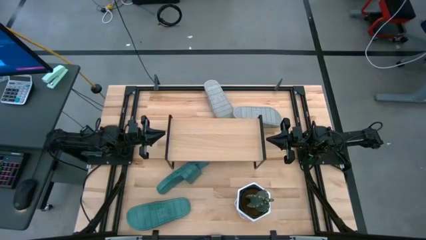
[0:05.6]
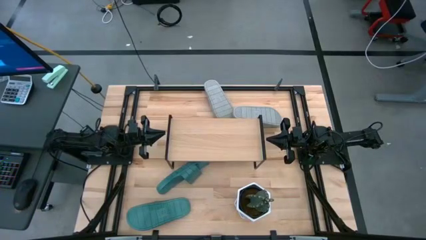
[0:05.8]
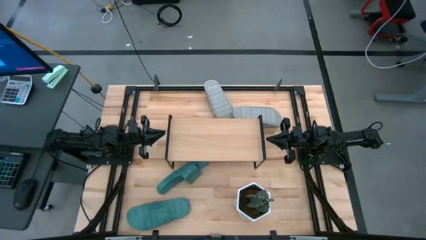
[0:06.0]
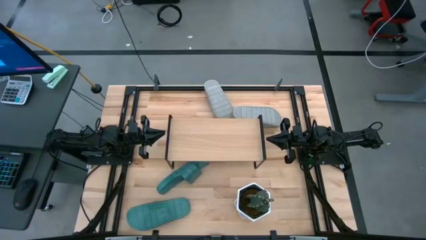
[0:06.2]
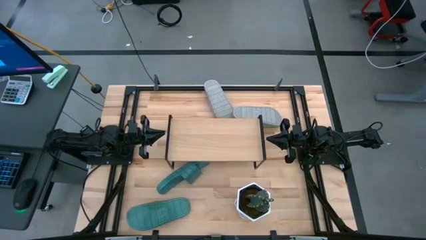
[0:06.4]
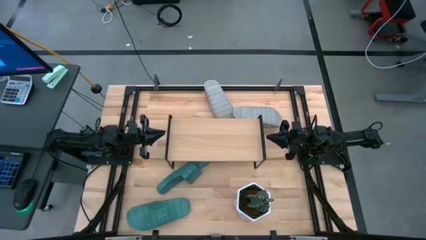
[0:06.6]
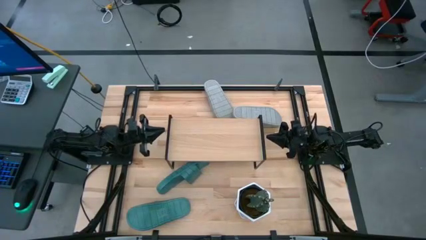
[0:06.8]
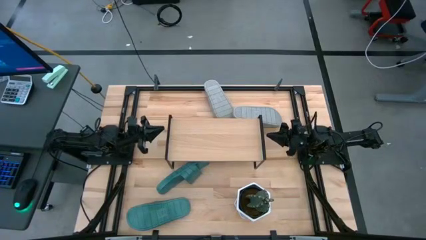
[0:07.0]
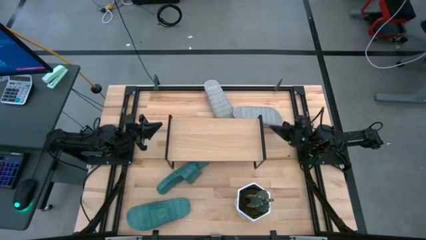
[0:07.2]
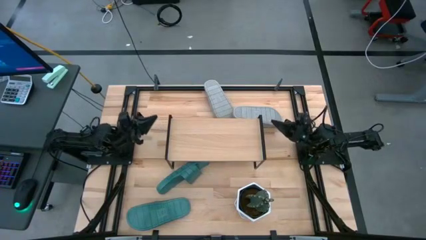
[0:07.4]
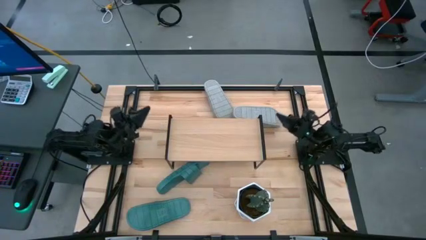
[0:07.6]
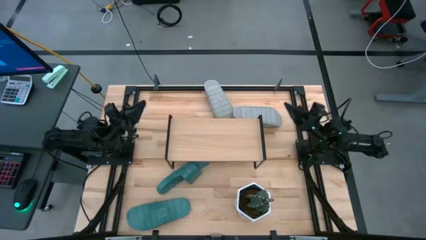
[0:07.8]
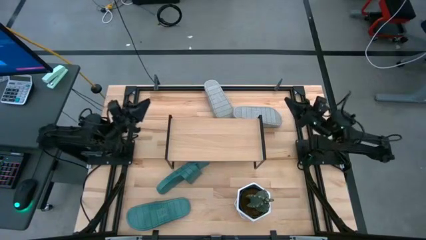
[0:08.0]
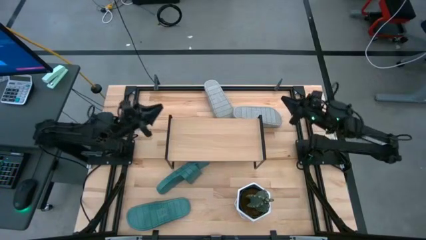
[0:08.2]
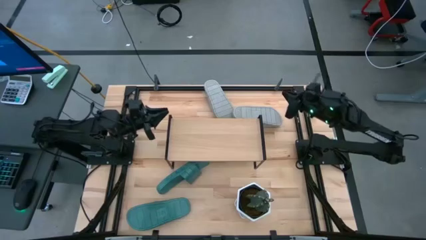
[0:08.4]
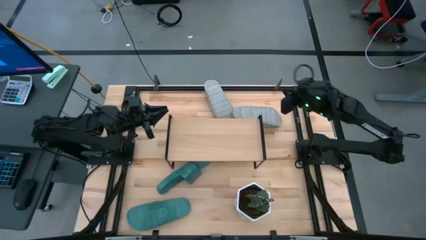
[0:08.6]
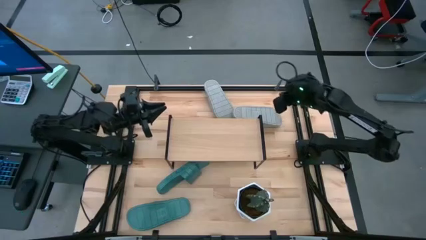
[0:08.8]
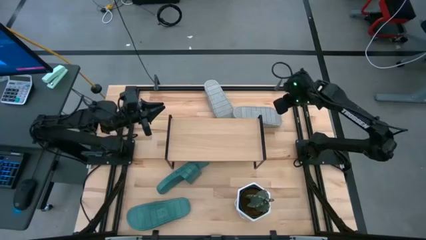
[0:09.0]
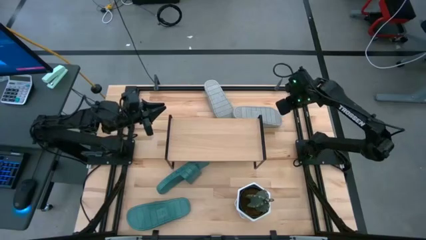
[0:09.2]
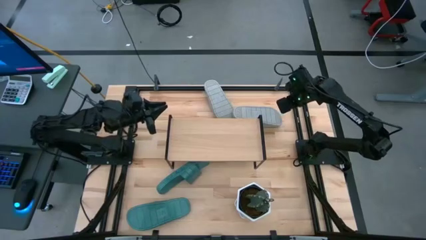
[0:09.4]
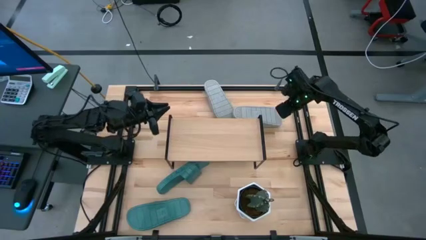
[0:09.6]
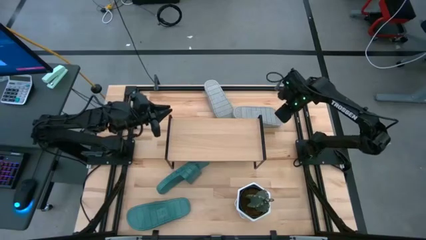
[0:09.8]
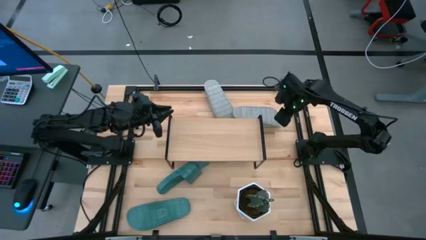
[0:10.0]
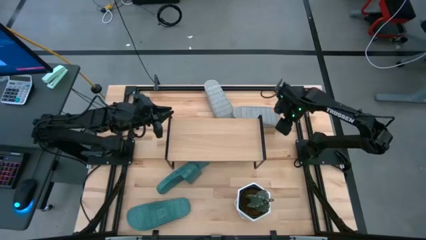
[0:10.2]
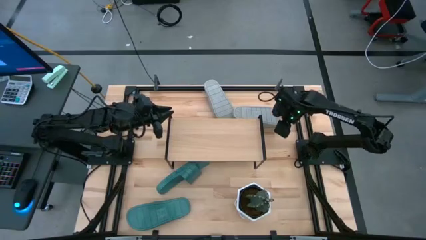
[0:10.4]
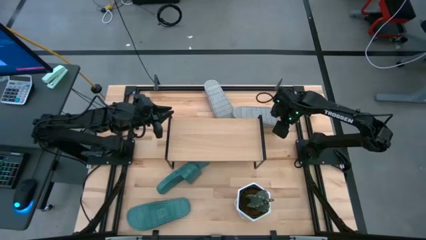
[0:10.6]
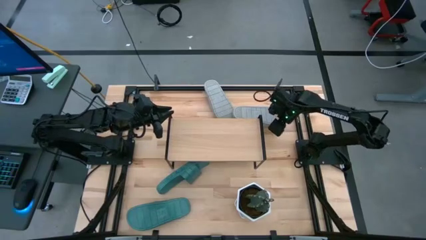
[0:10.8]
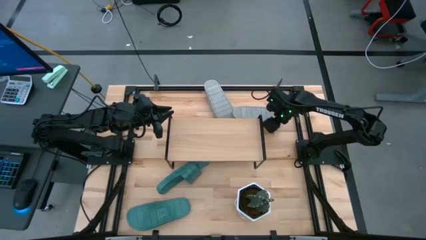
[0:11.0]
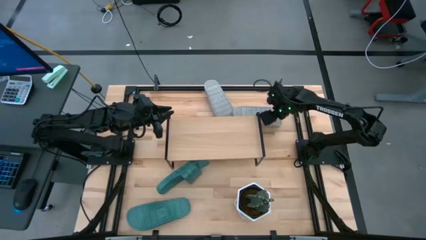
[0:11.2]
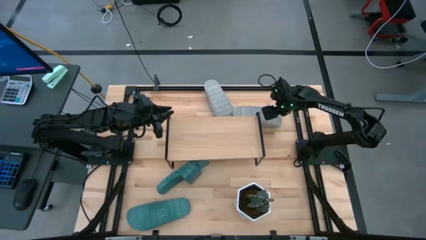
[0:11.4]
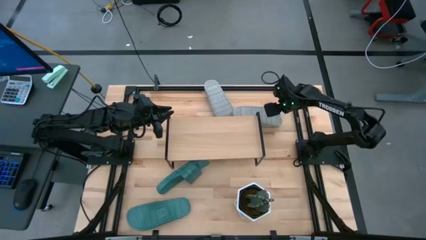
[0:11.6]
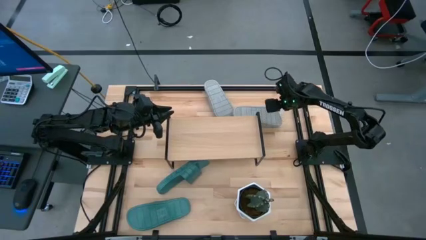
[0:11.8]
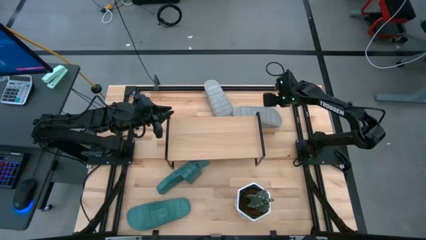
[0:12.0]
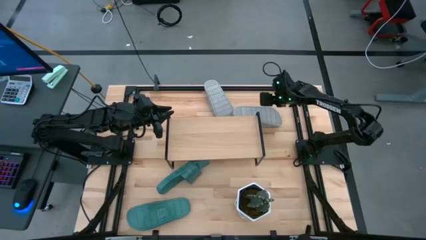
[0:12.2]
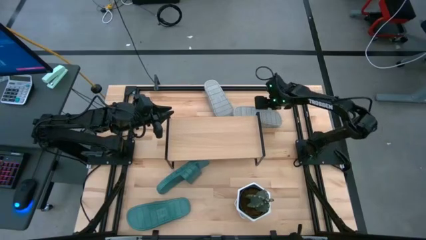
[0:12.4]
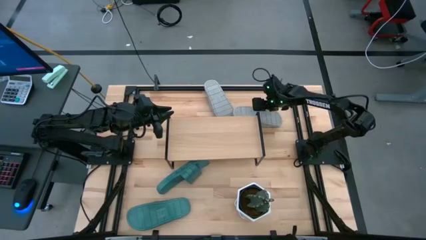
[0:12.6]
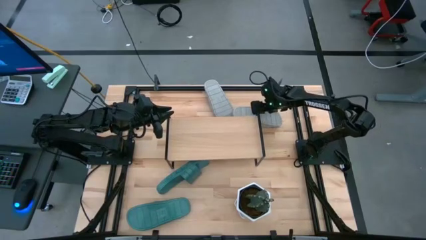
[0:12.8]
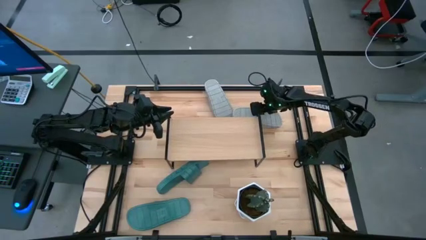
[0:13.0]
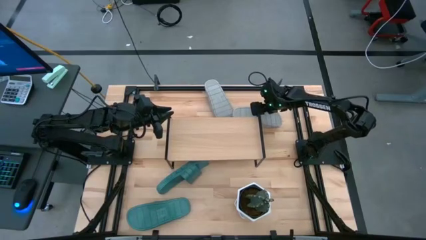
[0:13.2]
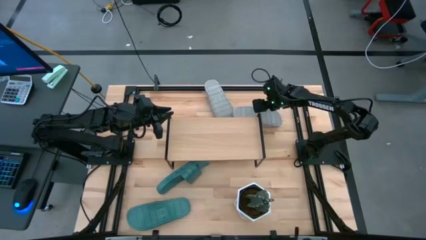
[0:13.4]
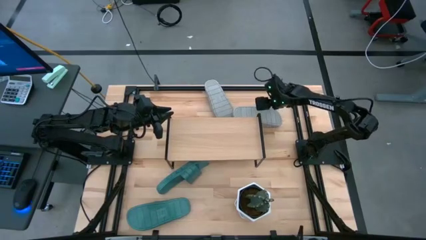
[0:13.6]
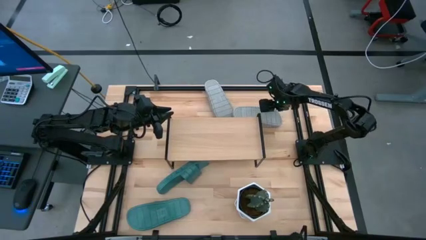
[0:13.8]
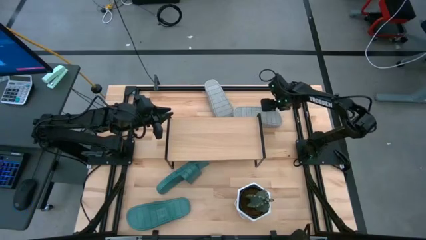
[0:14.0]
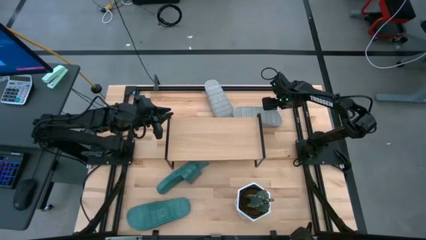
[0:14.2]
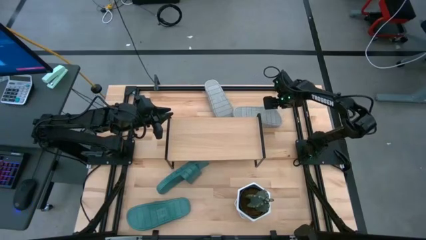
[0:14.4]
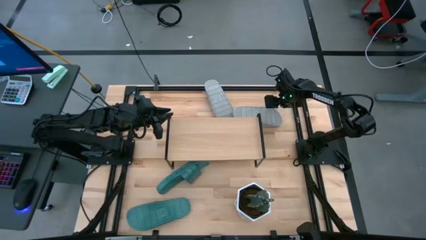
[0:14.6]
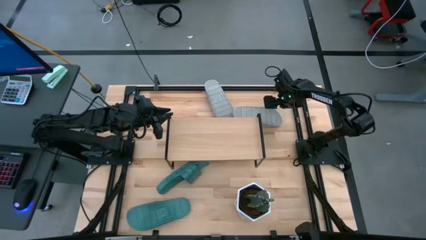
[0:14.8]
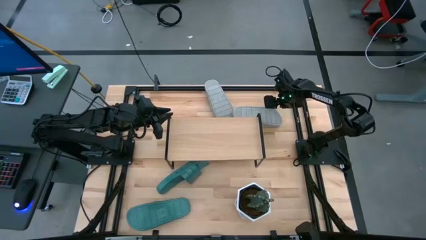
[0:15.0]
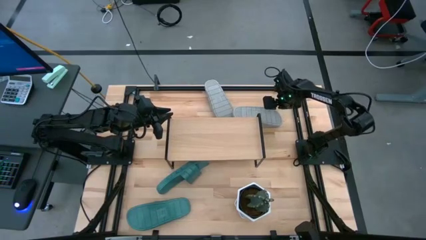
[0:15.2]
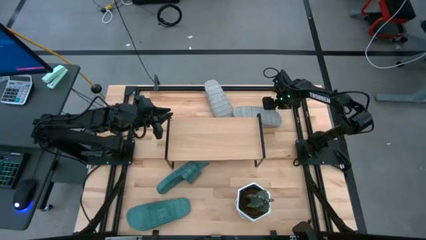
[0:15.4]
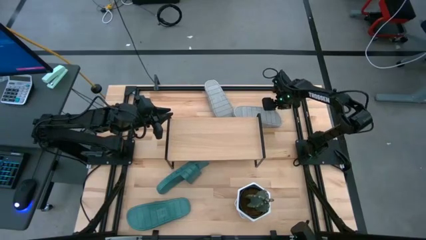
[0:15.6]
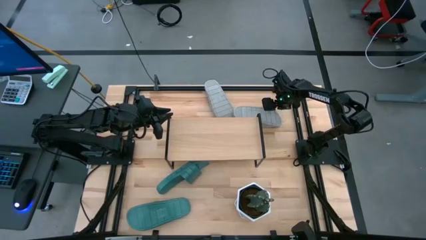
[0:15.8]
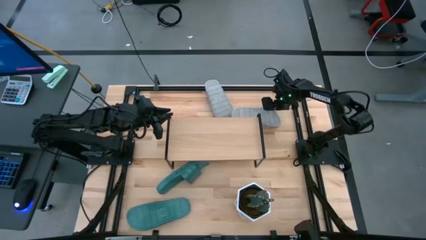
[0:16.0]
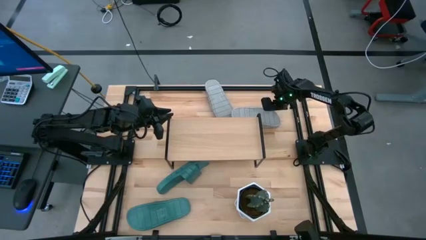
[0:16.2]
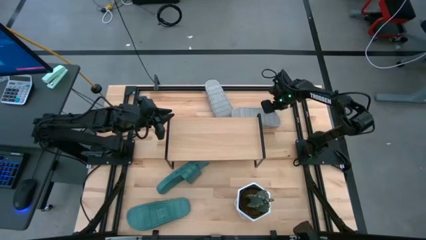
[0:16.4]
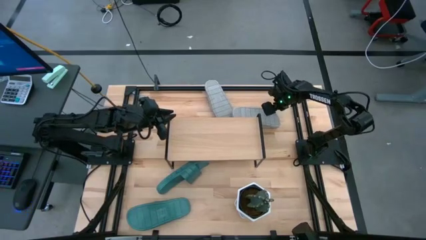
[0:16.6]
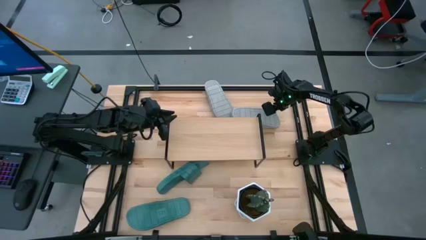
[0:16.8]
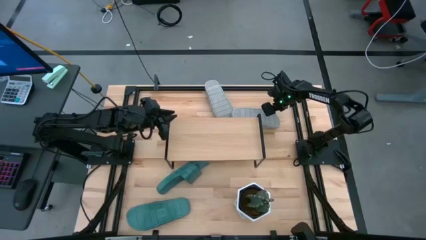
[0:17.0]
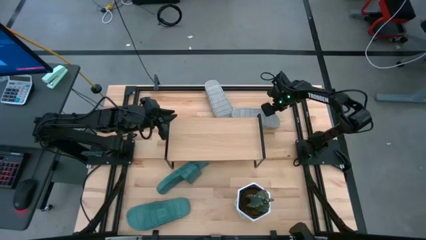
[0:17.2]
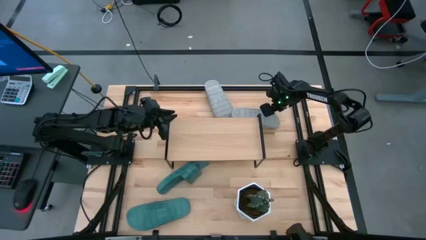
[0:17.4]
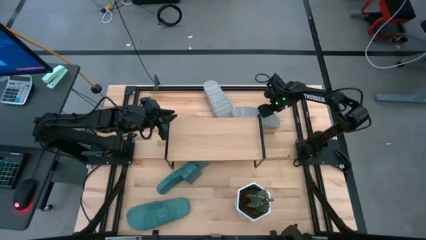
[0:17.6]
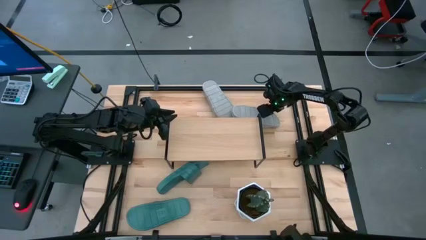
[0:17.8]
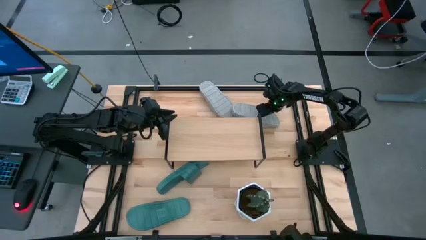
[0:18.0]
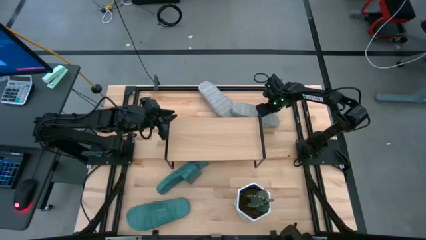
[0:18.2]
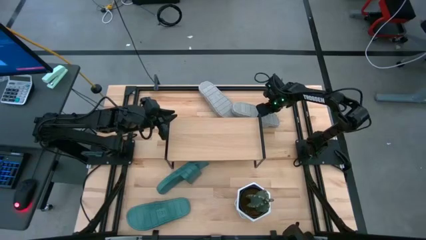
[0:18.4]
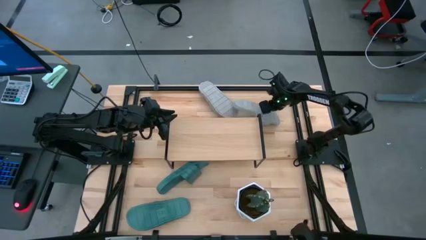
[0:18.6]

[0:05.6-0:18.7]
Task: Pick and place slides into the shelf
Put the right gray slide on the shelf
